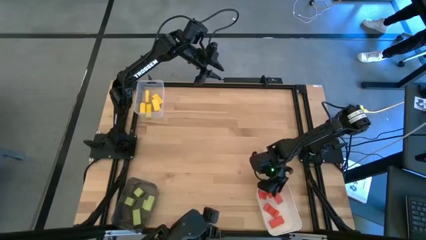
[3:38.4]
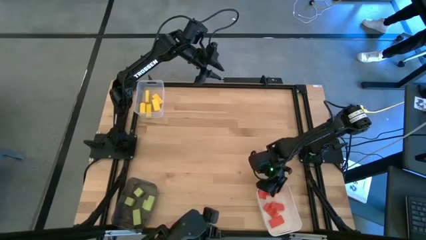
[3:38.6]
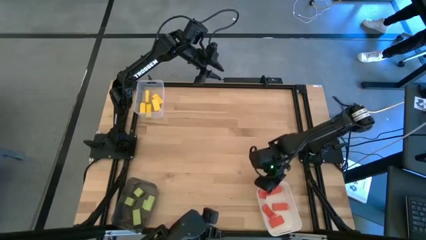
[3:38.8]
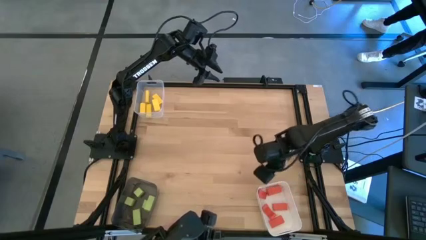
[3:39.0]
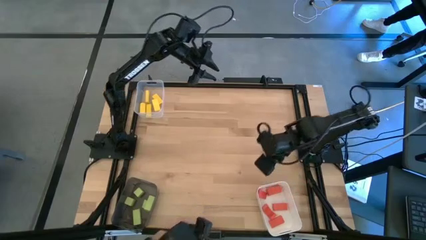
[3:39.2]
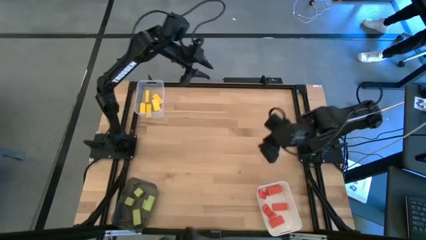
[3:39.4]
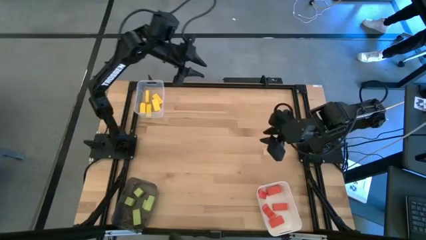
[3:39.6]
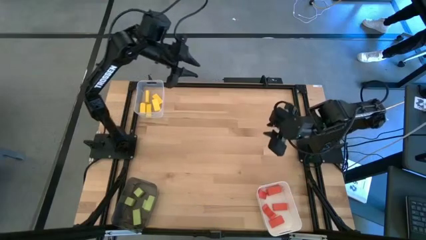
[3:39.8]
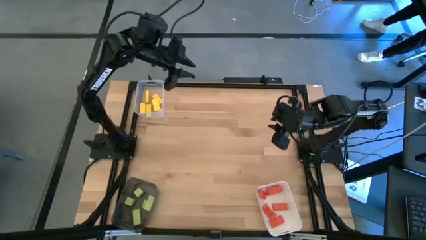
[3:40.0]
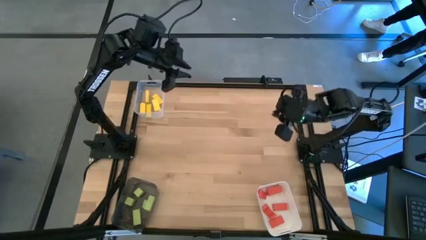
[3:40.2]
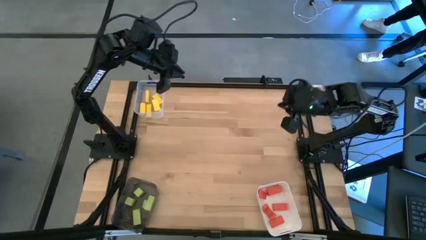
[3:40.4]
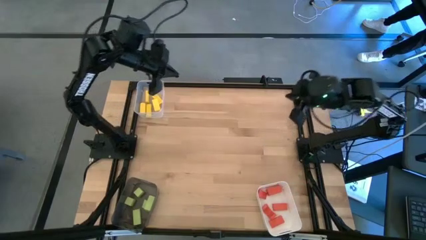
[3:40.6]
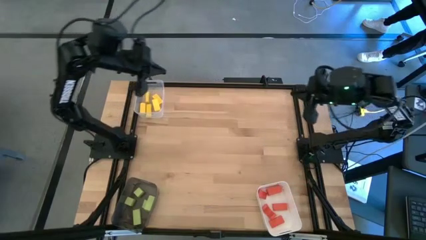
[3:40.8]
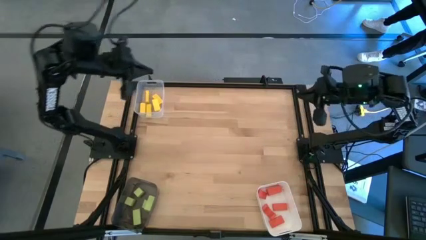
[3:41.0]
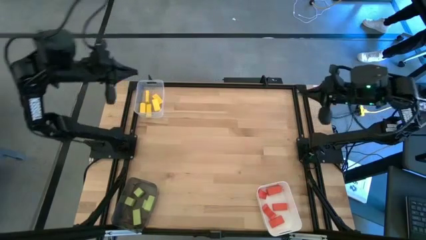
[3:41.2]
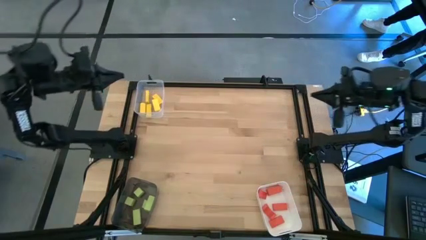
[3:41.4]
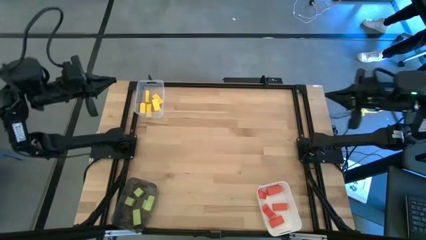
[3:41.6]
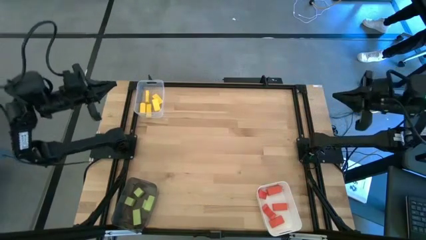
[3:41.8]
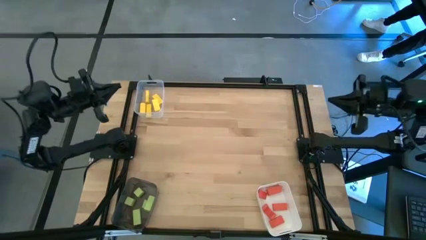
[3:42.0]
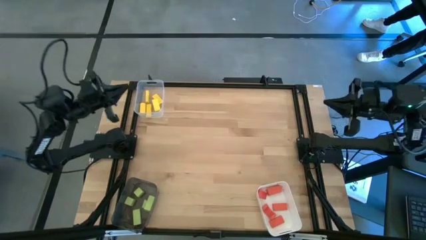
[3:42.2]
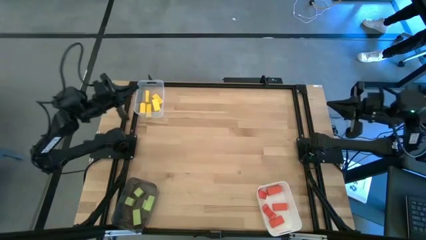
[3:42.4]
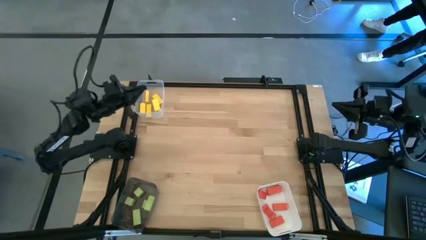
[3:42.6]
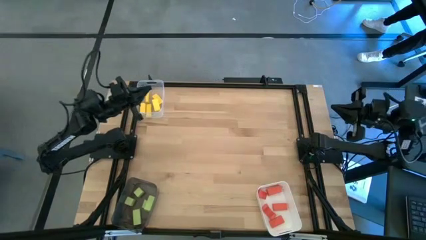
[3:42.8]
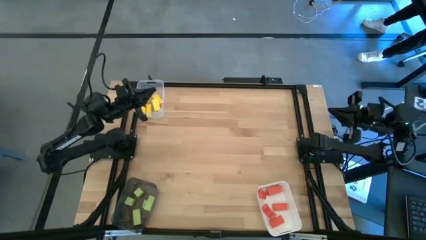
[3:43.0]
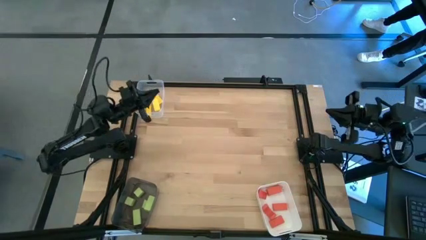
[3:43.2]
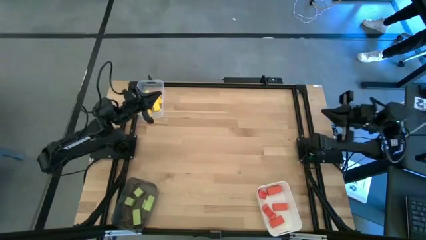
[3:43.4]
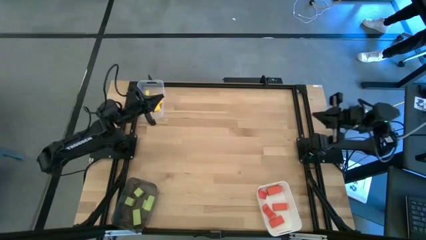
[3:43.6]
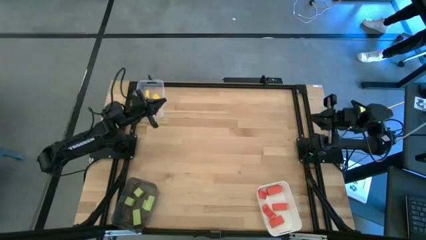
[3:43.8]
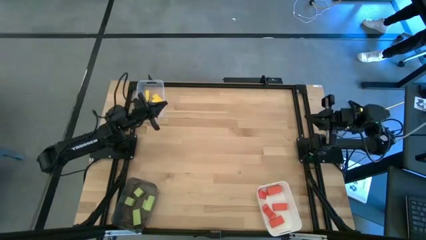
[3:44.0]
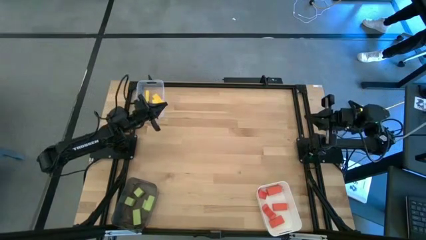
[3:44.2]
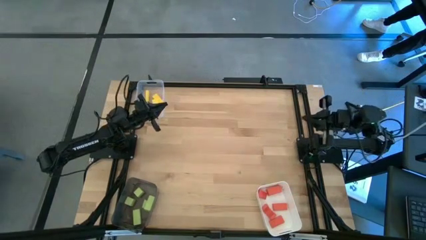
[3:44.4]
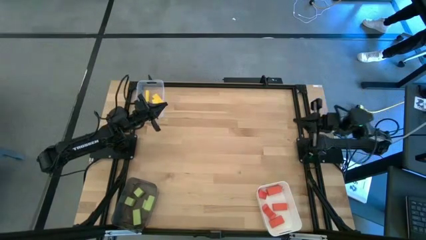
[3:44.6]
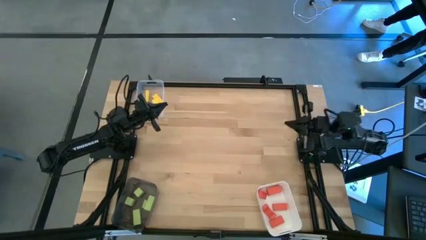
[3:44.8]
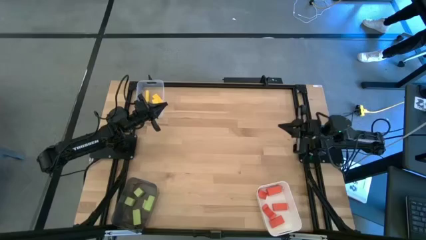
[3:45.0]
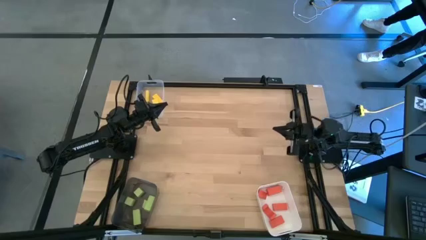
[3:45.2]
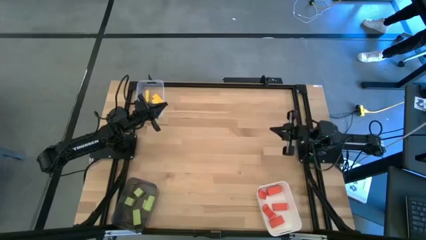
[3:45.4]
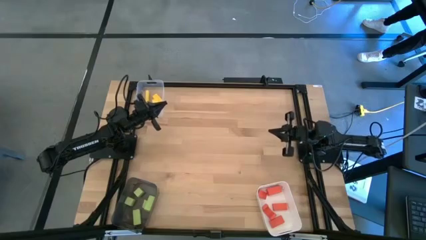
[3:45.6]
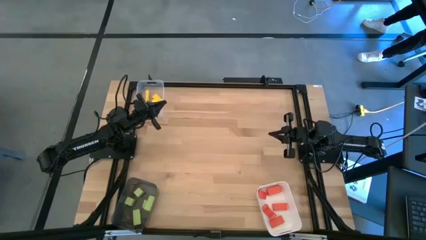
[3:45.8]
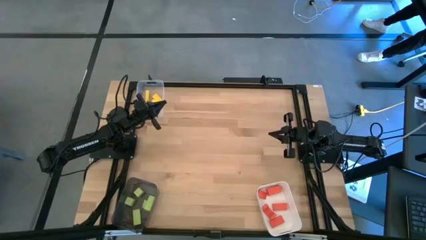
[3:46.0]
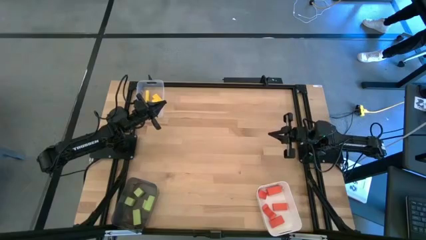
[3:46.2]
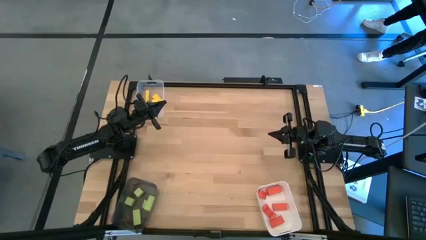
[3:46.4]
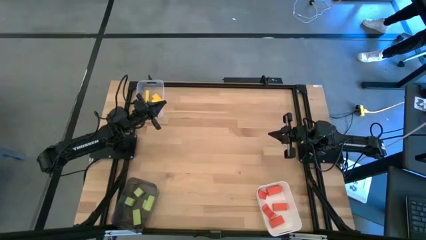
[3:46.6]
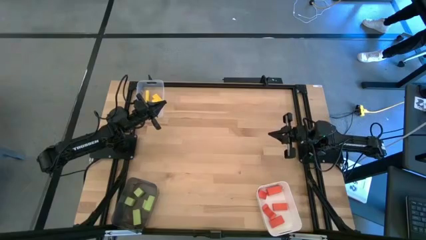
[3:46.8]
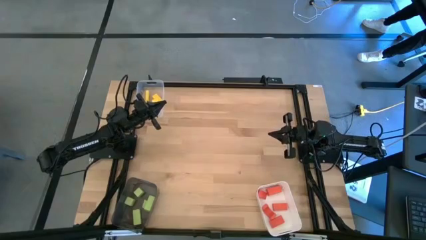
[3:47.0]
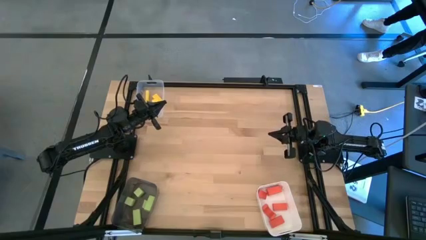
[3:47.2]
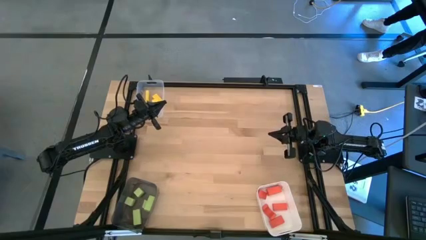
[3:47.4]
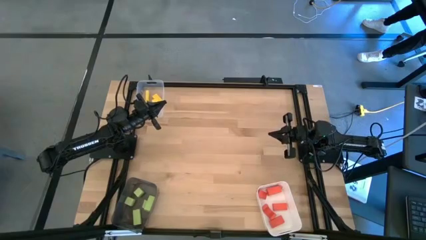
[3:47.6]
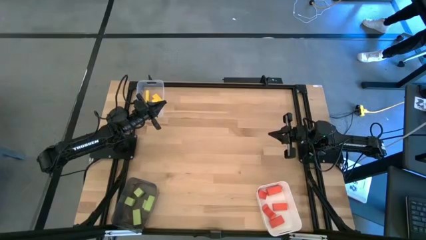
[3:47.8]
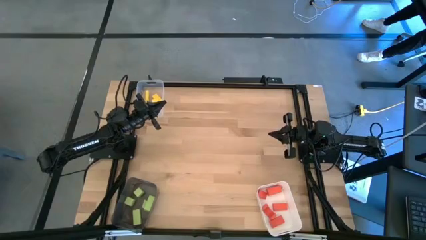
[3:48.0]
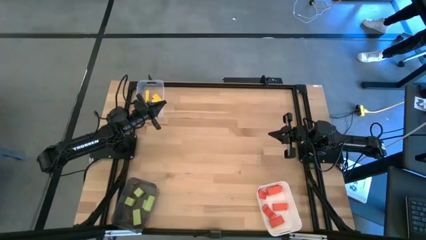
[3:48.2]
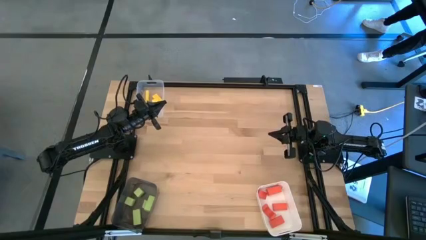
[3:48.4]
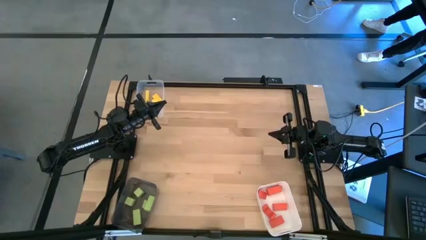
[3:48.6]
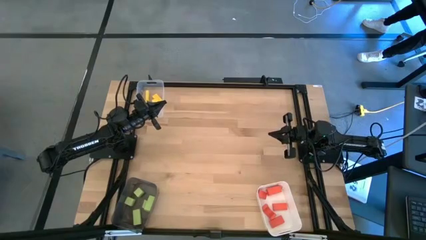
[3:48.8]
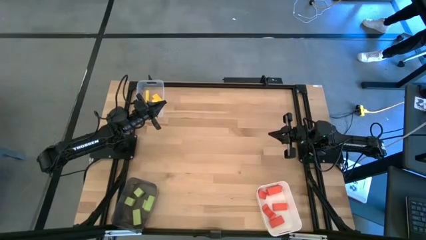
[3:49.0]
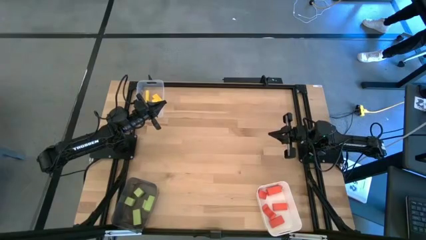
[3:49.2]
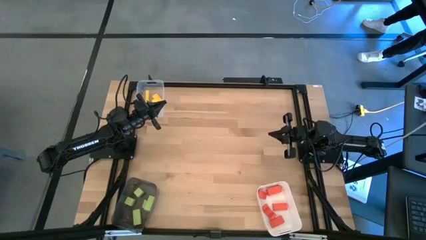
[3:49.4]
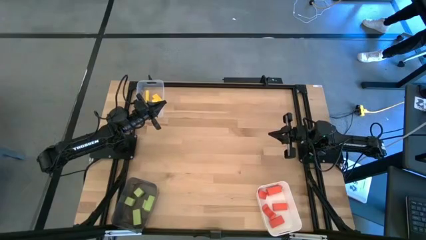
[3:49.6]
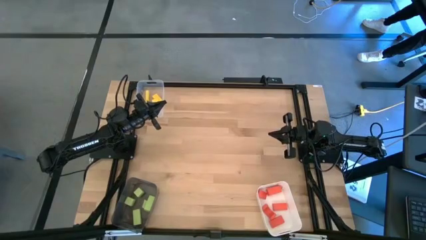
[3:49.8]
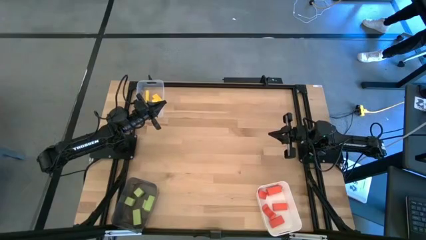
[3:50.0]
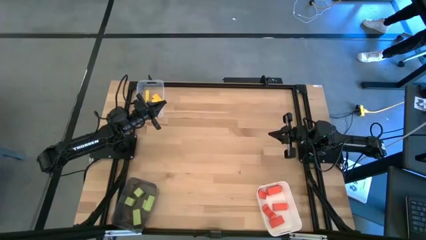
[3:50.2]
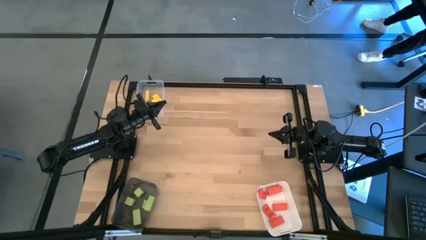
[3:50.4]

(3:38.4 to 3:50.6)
Task: Sort & place blocks by color
Return to Home Position
